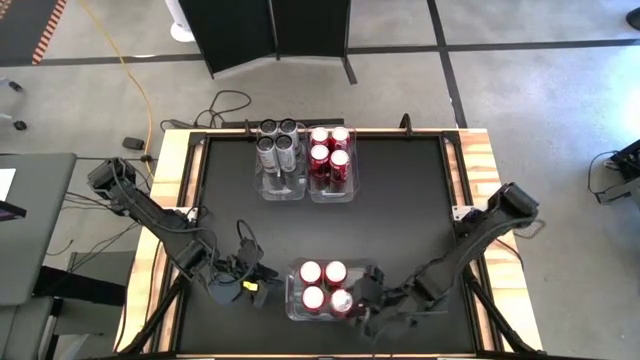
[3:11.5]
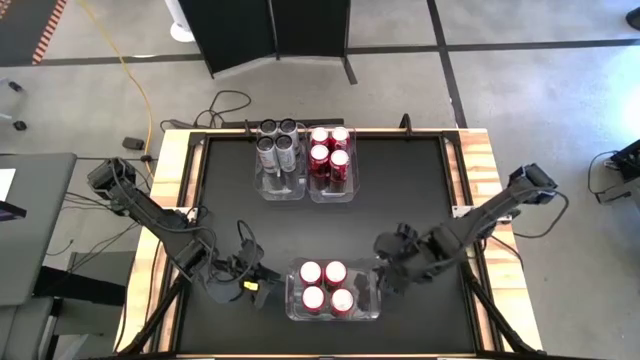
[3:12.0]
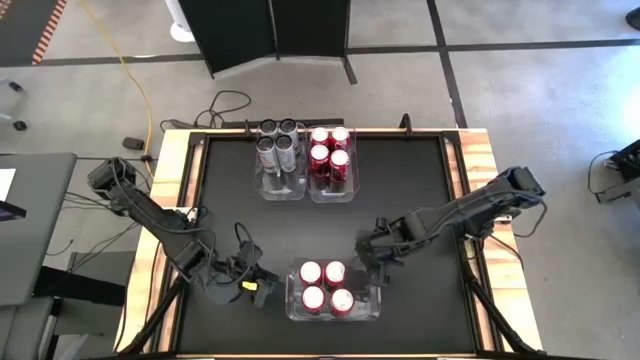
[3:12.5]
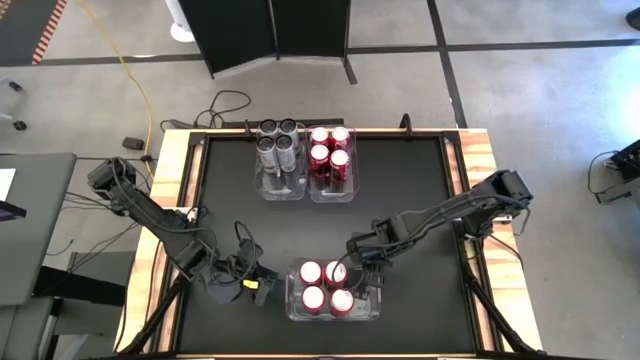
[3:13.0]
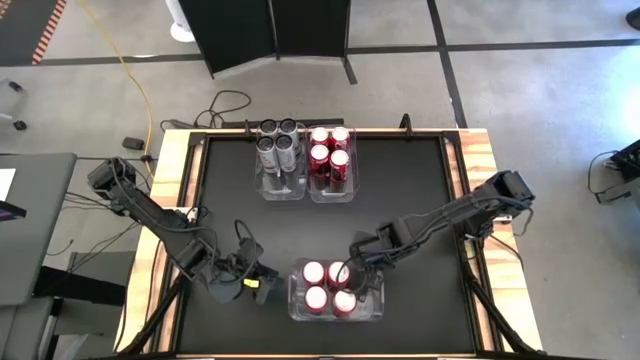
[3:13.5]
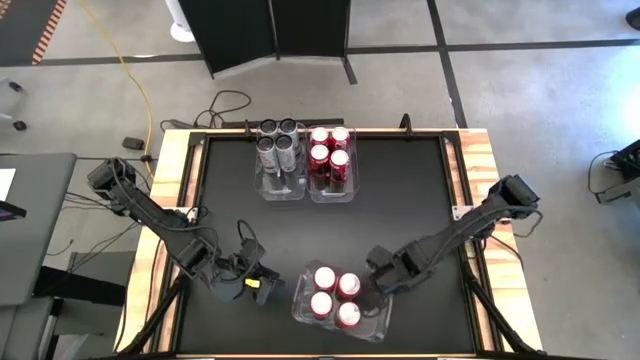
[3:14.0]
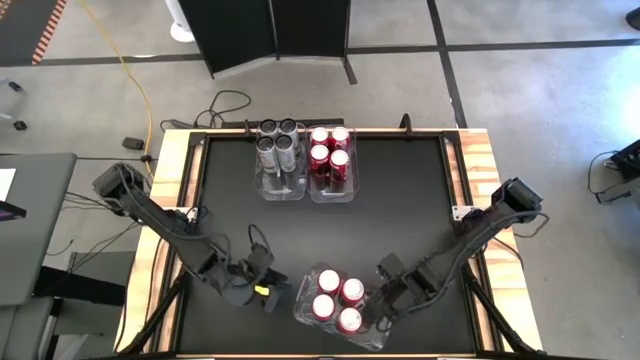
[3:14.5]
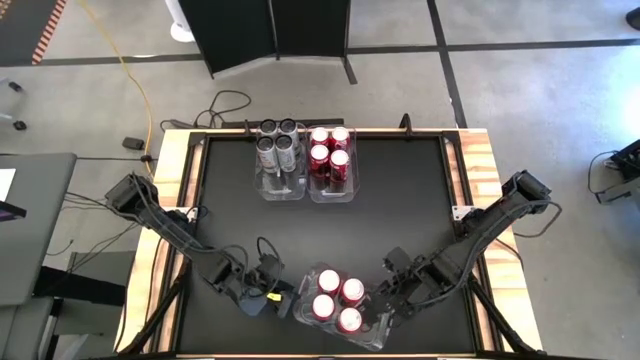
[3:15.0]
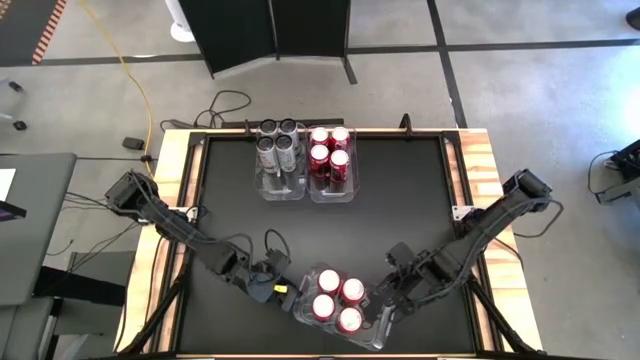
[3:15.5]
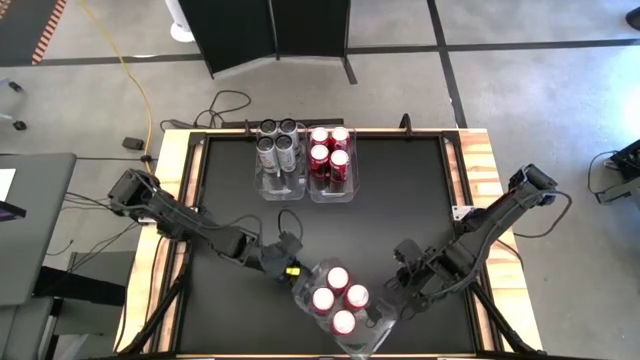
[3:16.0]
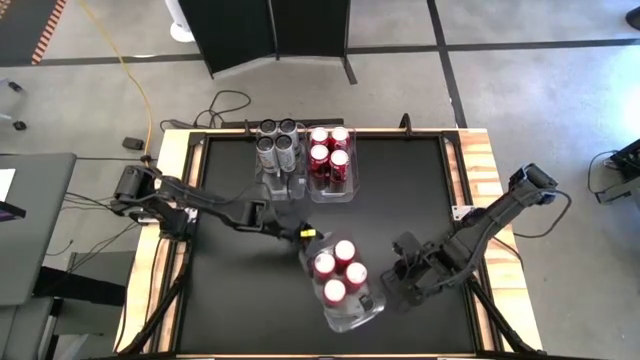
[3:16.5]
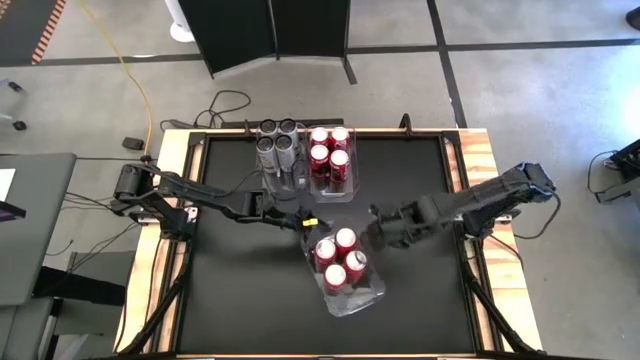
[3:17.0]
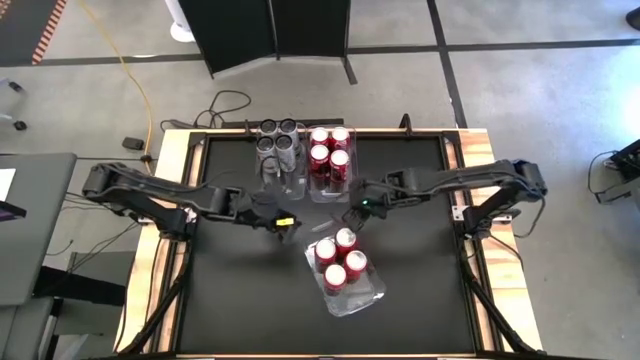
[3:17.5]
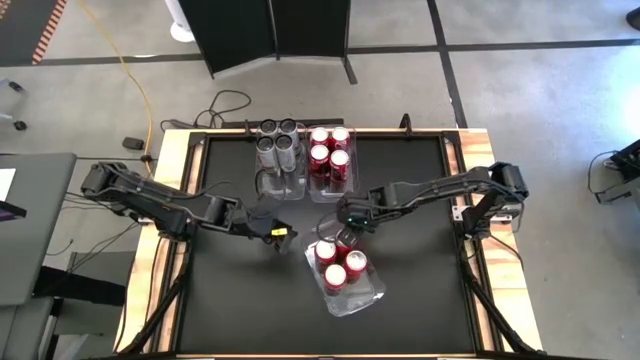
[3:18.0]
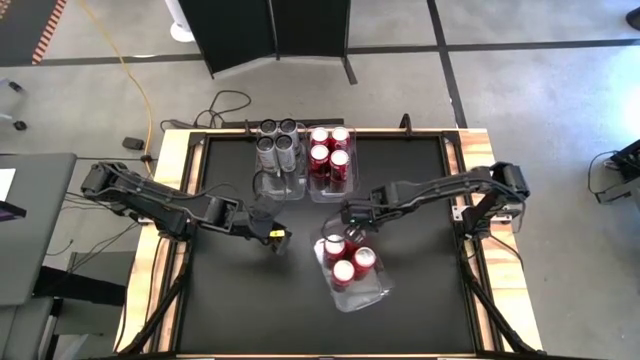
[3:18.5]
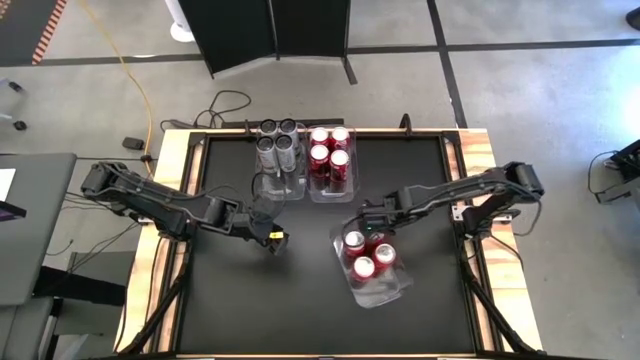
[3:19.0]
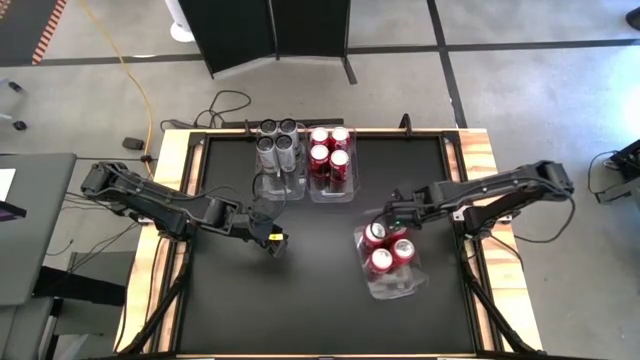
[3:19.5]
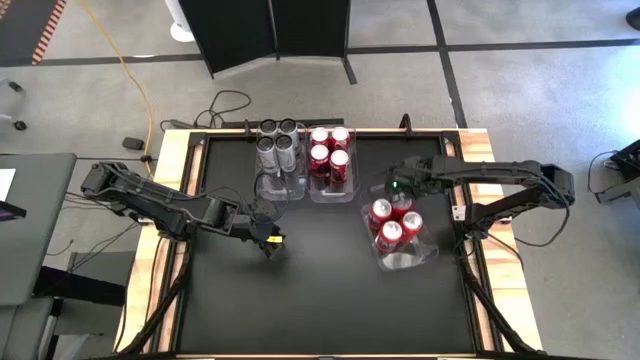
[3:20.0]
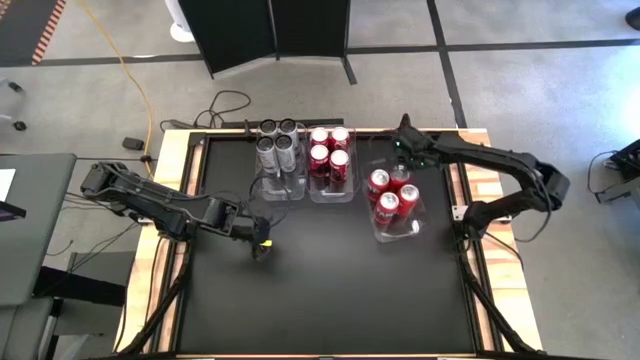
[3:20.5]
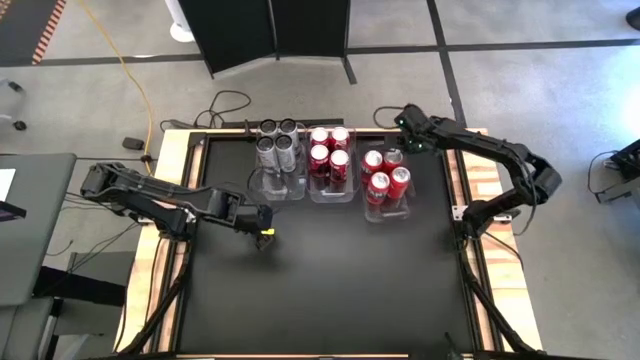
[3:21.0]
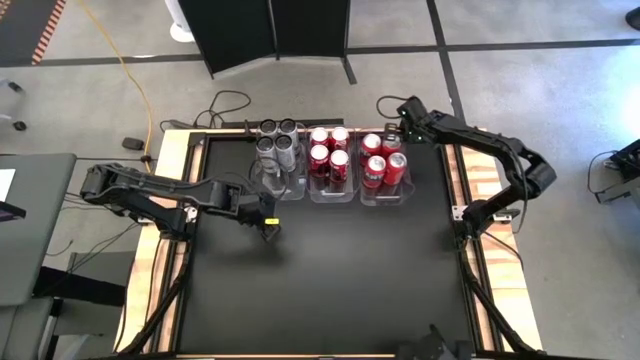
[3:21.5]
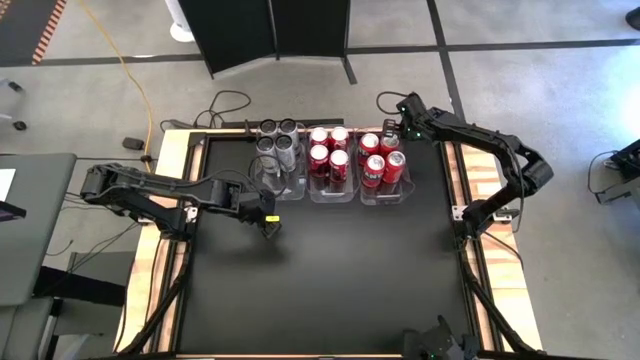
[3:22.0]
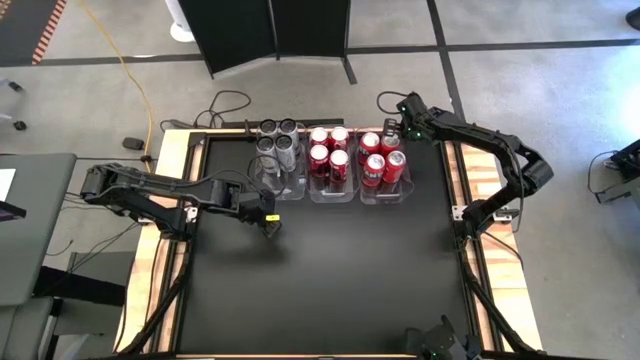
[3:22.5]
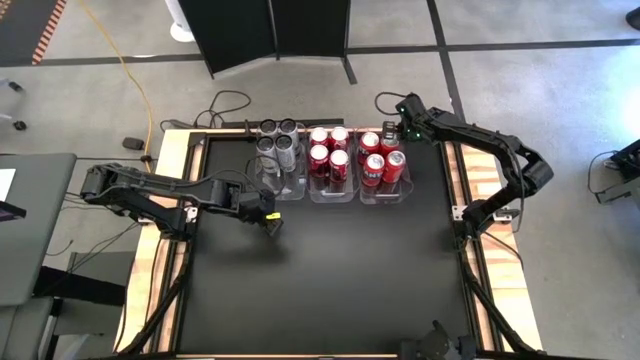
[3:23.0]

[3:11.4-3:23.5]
Task: Sort soda cans
Move the bottom transparent bin on the right side of the top right transparent bin

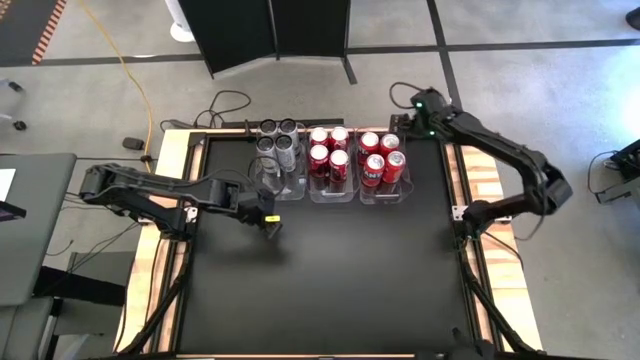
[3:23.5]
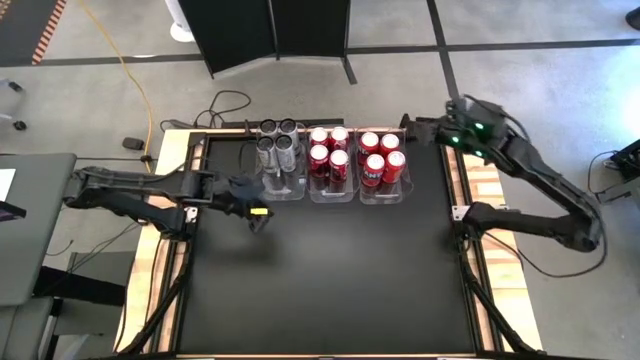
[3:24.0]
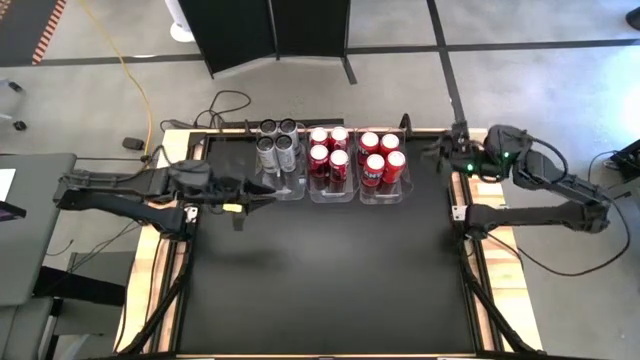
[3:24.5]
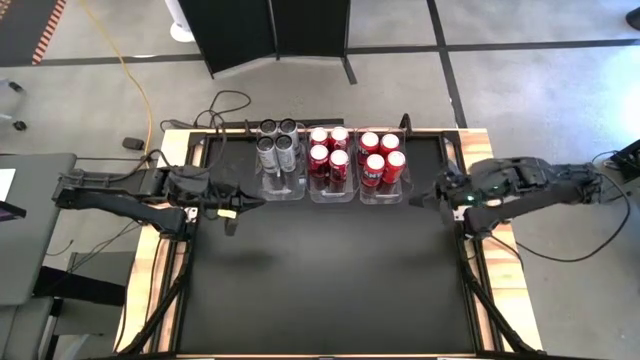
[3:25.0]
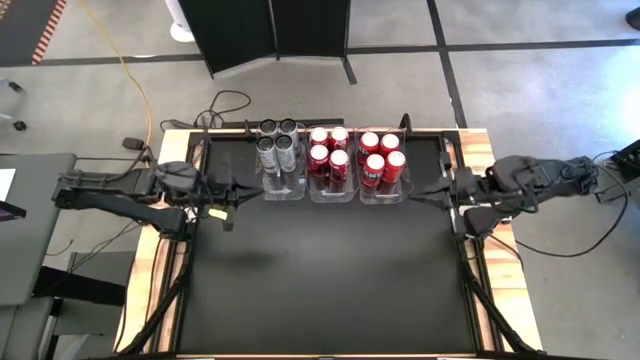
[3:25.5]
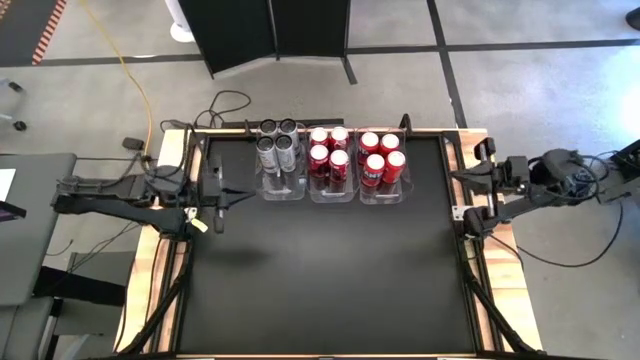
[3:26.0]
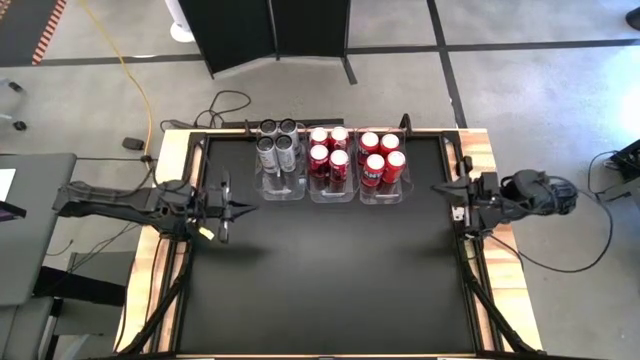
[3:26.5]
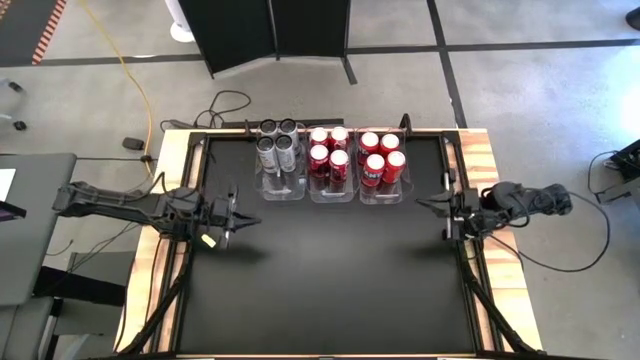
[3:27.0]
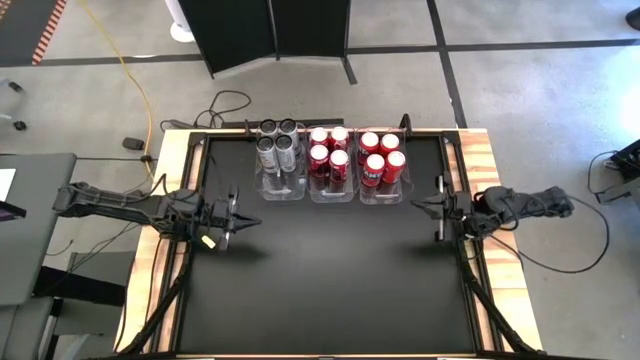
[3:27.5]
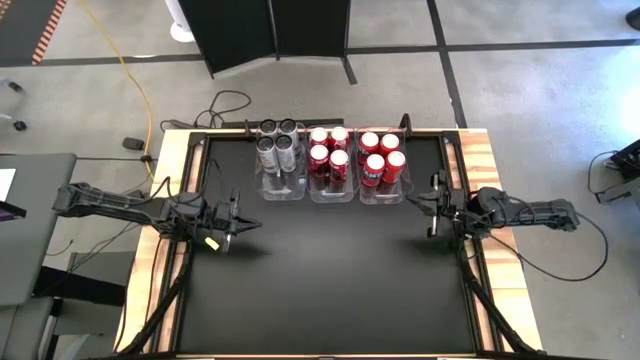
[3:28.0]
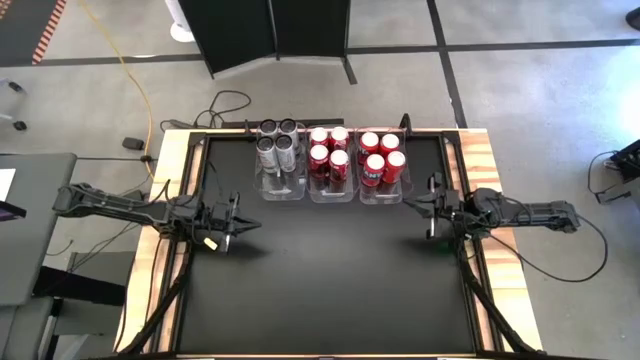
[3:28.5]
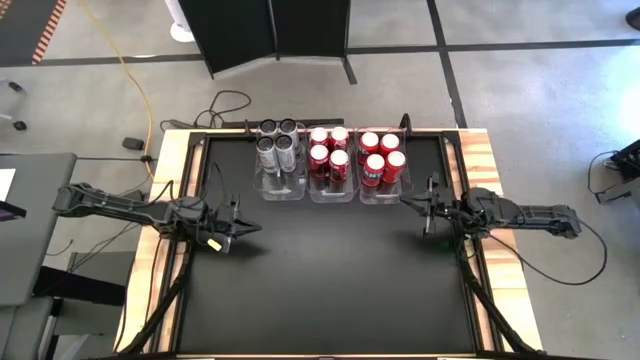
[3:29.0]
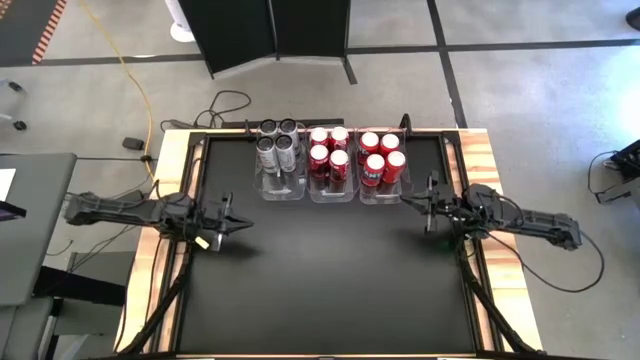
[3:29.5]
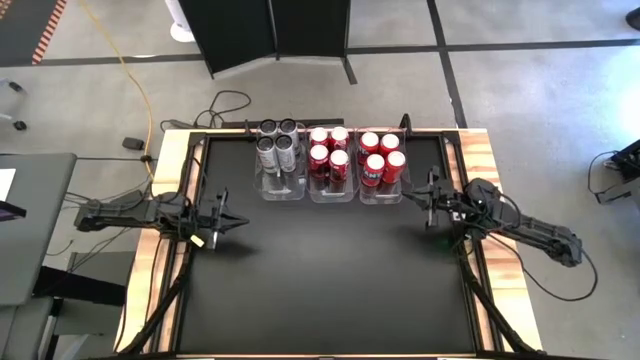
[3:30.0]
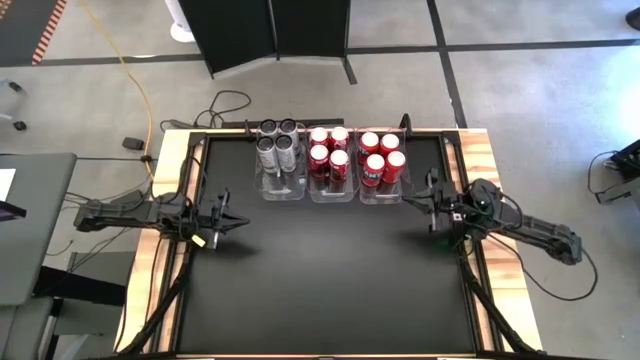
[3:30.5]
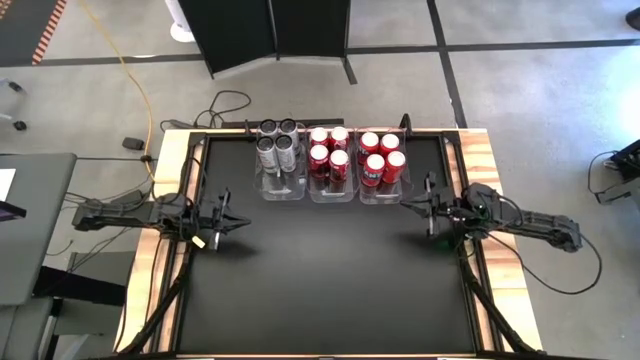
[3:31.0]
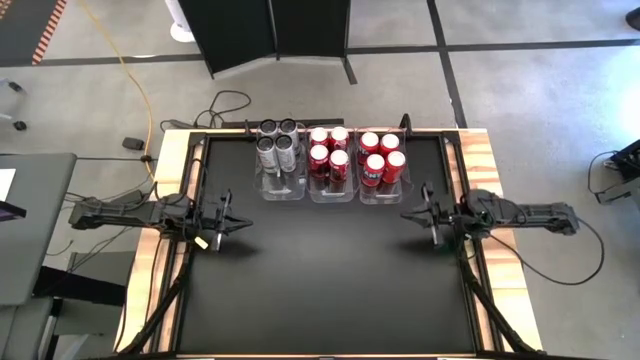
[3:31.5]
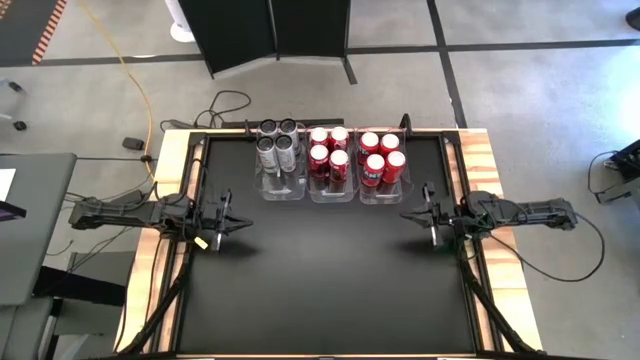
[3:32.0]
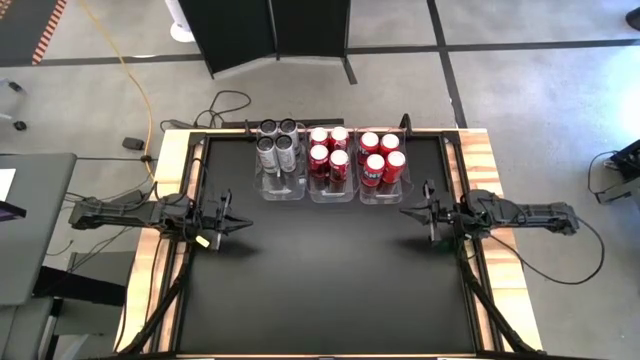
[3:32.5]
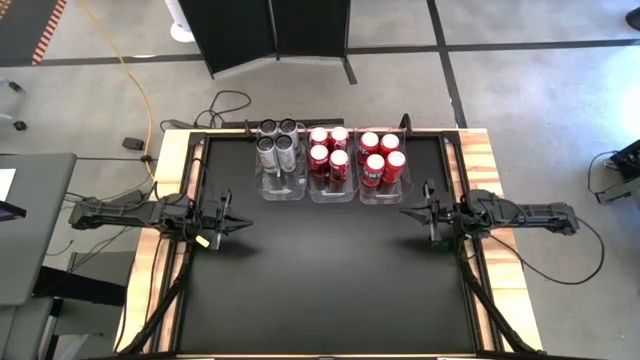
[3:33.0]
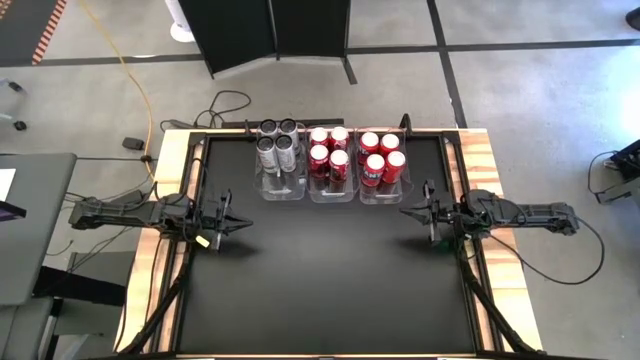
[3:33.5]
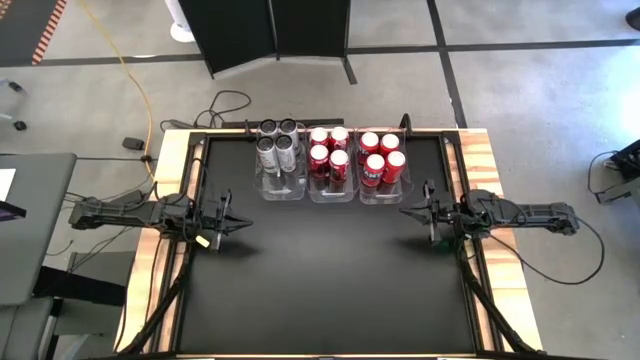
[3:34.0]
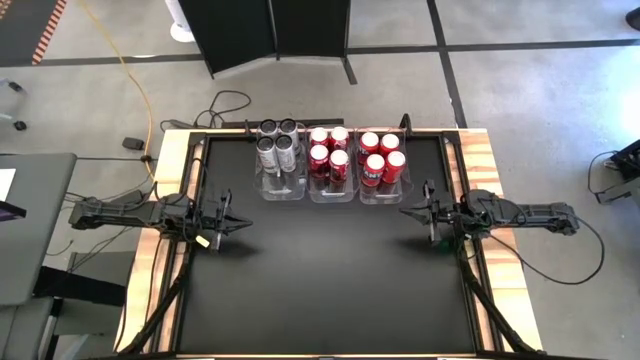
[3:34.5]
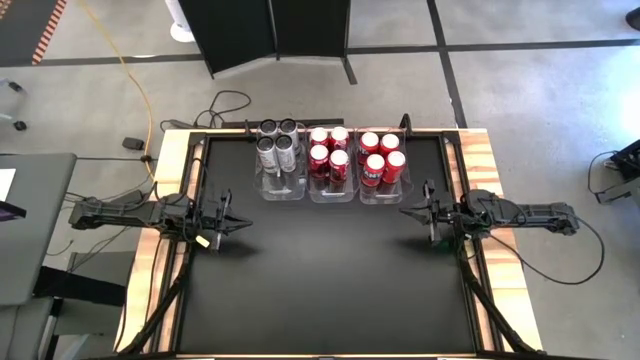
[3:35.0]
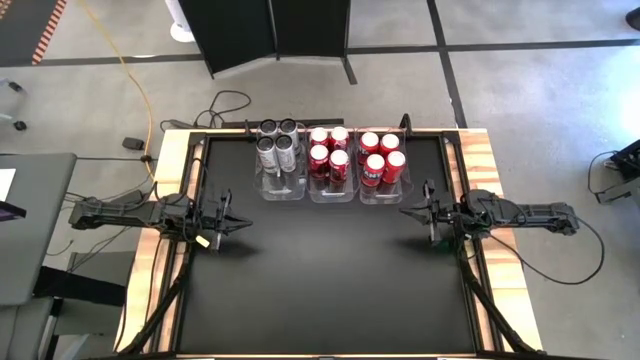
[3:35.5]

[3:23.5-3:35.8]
Return to Home Position
